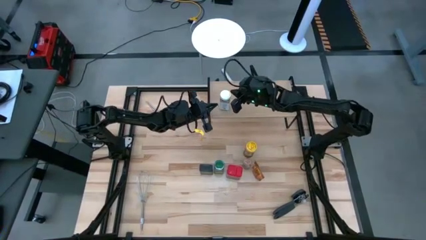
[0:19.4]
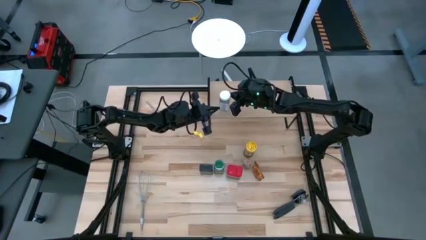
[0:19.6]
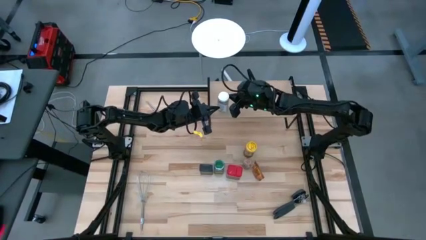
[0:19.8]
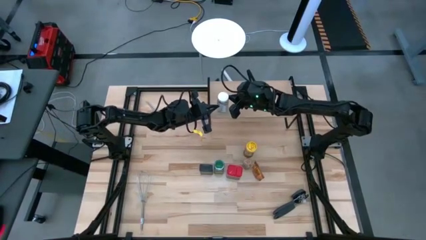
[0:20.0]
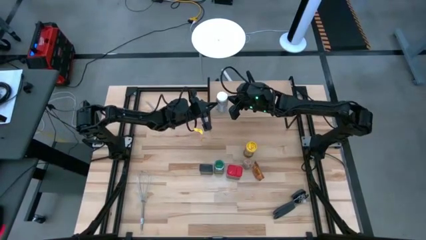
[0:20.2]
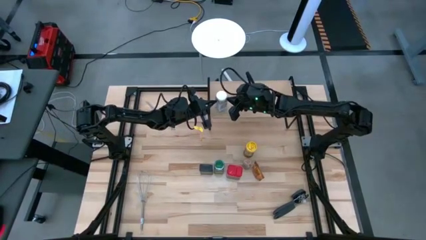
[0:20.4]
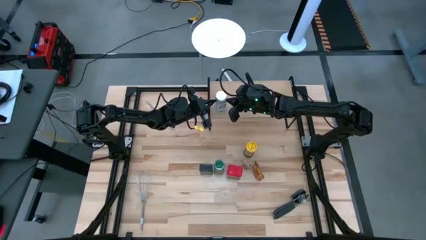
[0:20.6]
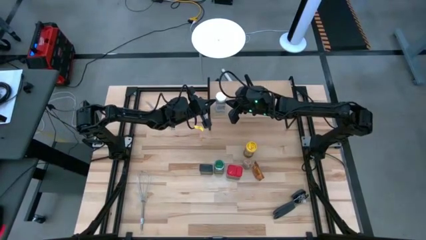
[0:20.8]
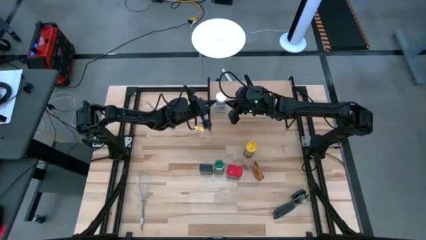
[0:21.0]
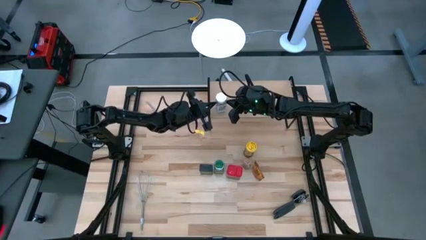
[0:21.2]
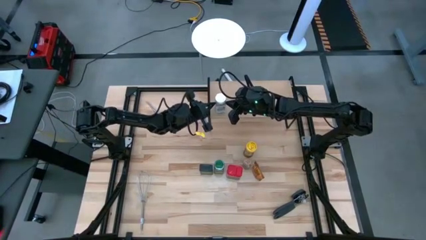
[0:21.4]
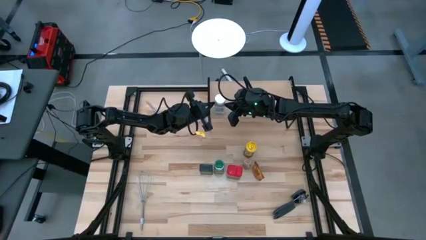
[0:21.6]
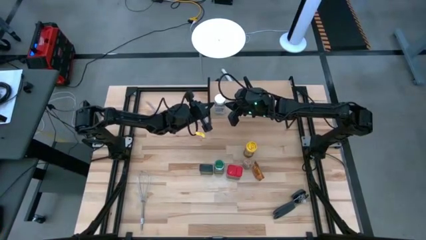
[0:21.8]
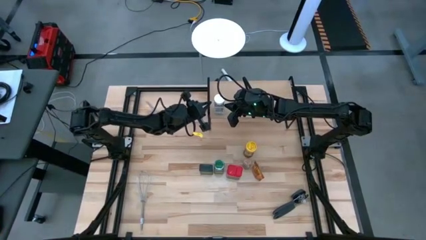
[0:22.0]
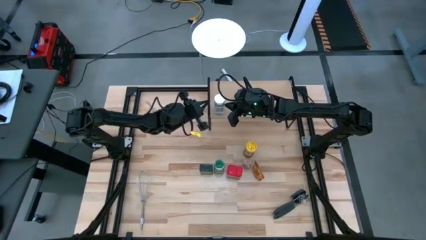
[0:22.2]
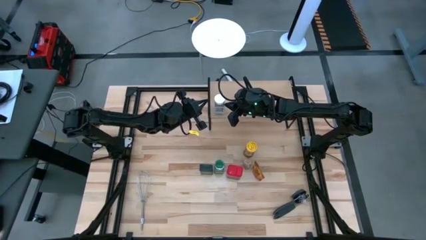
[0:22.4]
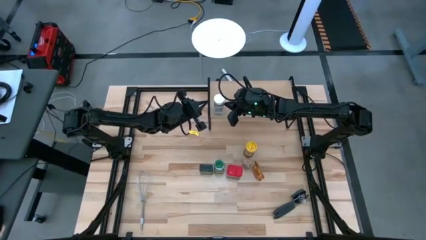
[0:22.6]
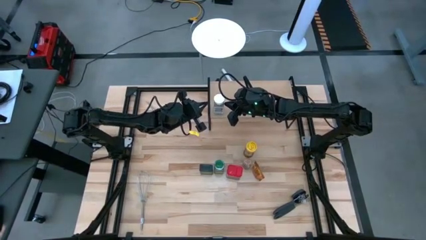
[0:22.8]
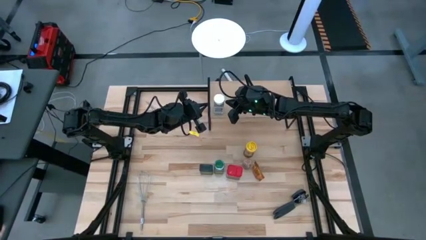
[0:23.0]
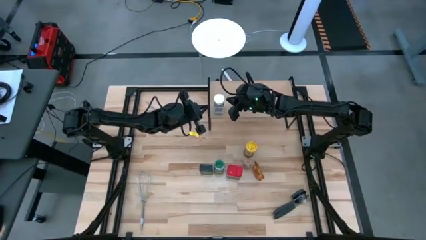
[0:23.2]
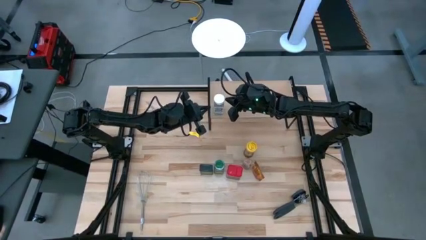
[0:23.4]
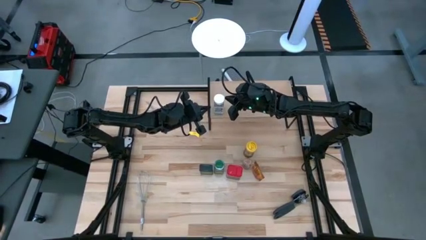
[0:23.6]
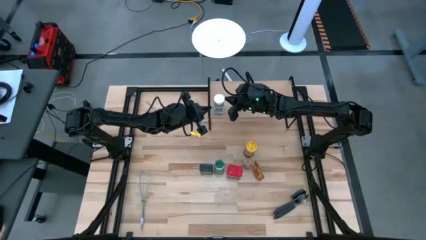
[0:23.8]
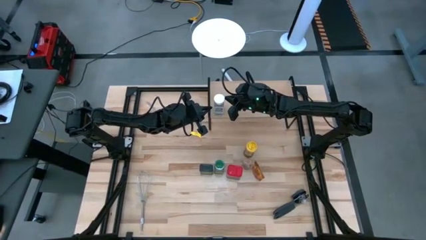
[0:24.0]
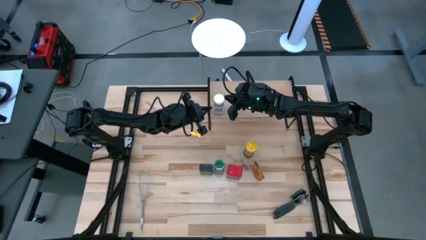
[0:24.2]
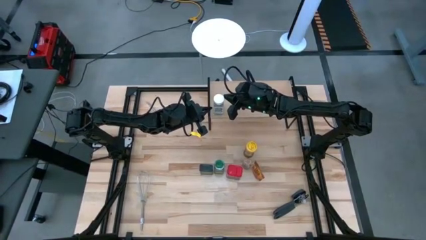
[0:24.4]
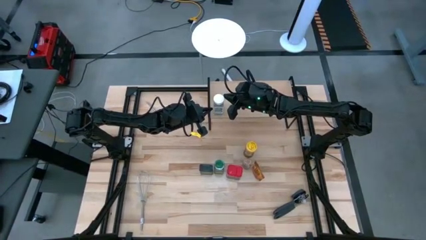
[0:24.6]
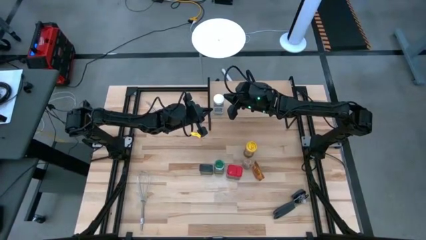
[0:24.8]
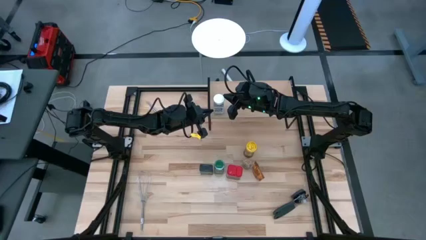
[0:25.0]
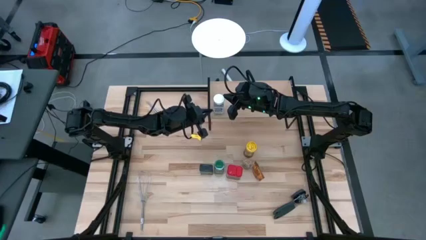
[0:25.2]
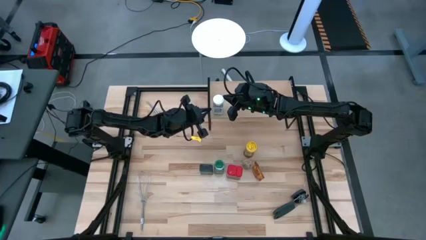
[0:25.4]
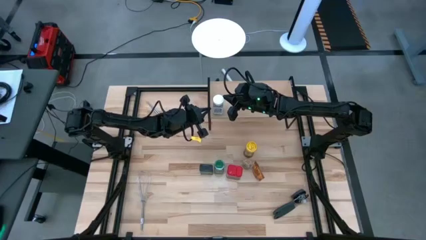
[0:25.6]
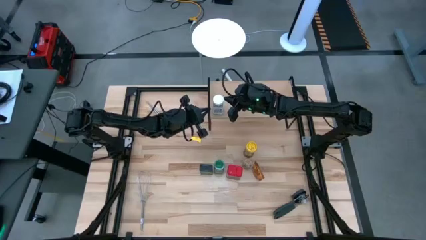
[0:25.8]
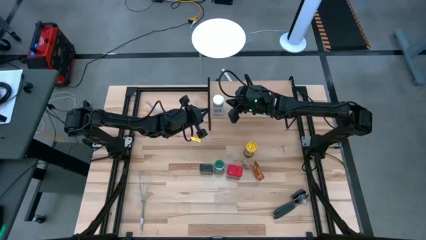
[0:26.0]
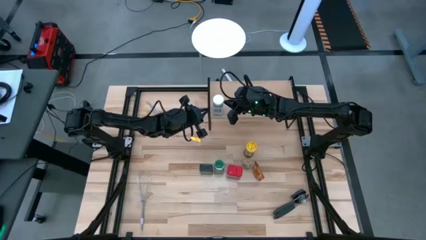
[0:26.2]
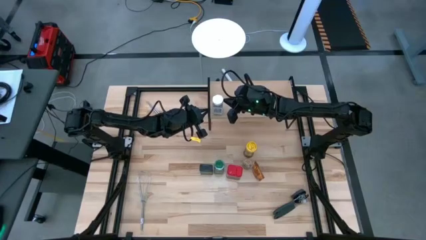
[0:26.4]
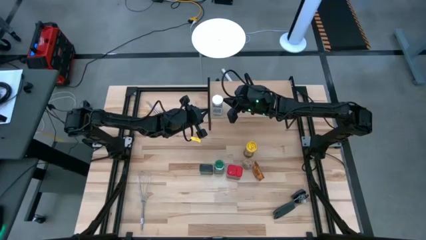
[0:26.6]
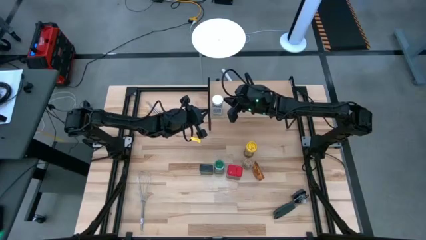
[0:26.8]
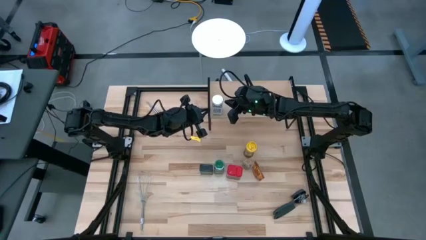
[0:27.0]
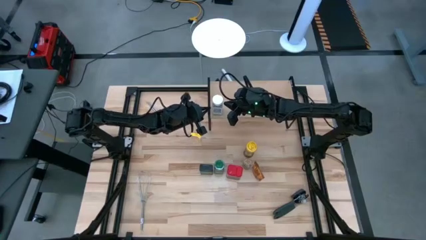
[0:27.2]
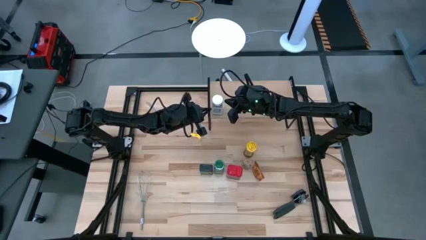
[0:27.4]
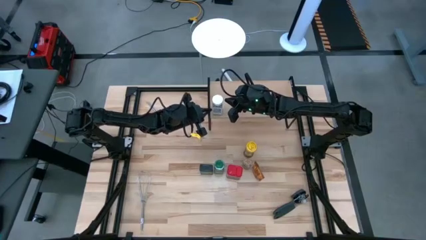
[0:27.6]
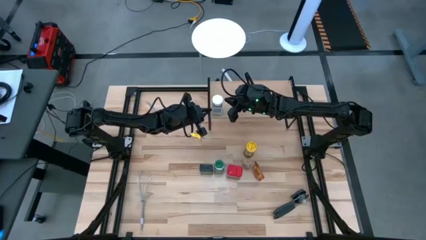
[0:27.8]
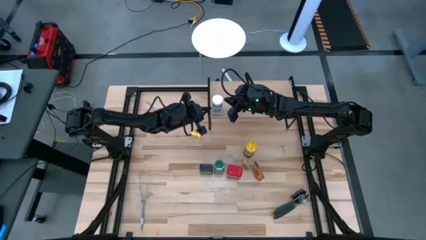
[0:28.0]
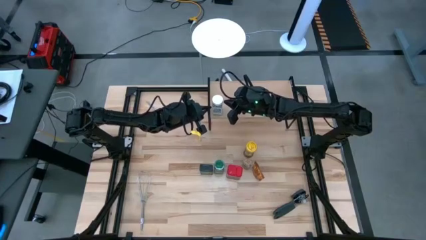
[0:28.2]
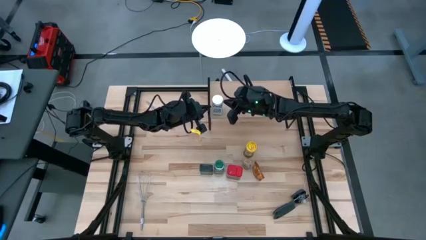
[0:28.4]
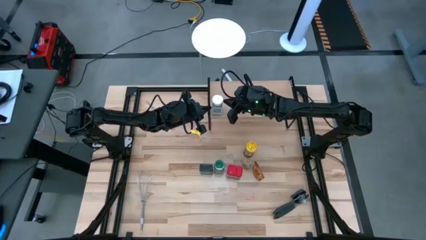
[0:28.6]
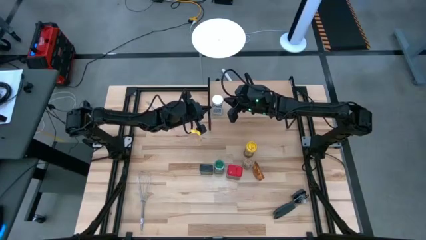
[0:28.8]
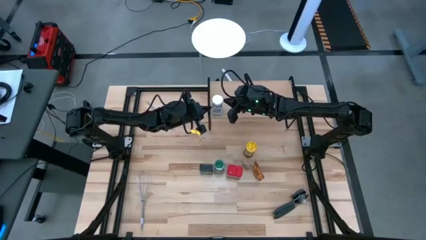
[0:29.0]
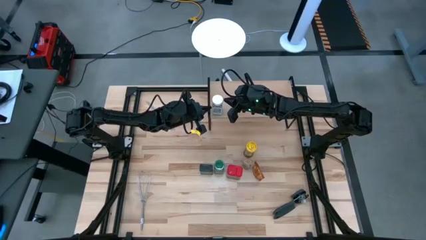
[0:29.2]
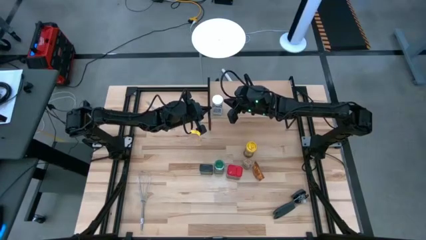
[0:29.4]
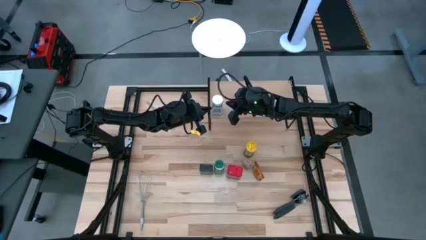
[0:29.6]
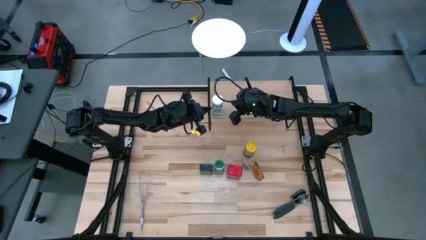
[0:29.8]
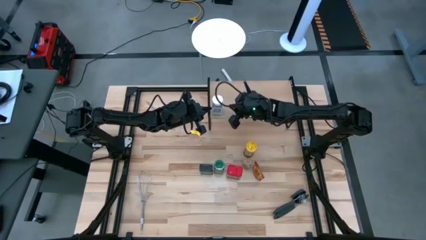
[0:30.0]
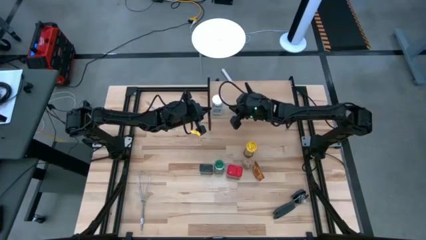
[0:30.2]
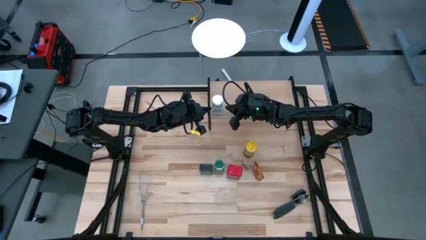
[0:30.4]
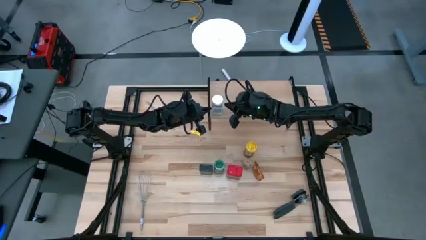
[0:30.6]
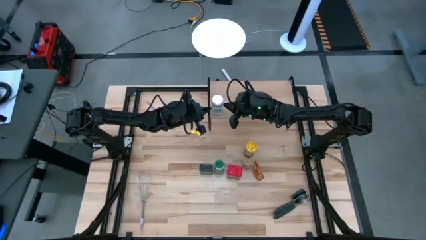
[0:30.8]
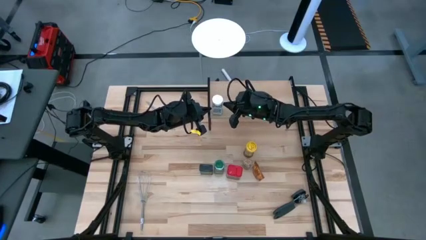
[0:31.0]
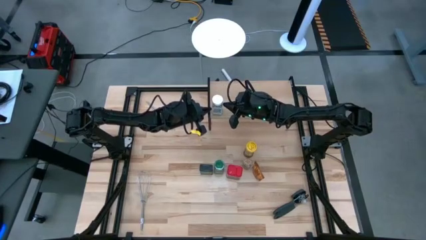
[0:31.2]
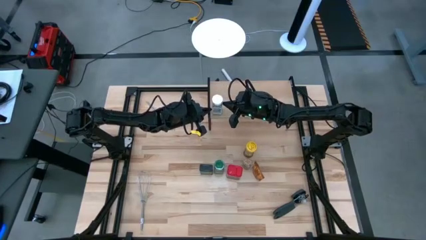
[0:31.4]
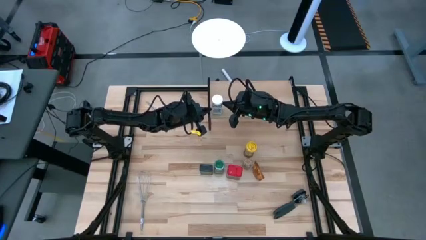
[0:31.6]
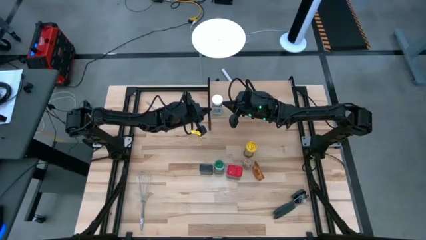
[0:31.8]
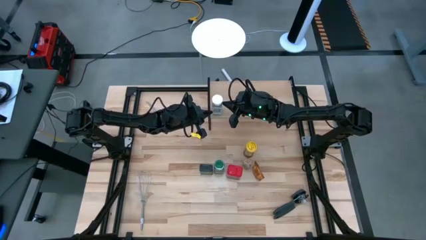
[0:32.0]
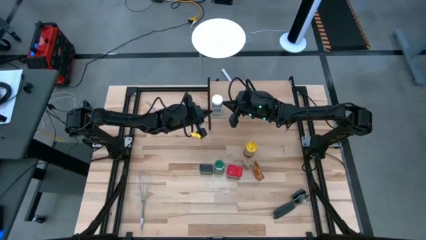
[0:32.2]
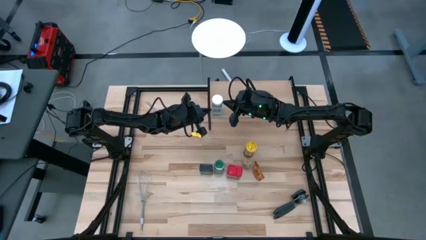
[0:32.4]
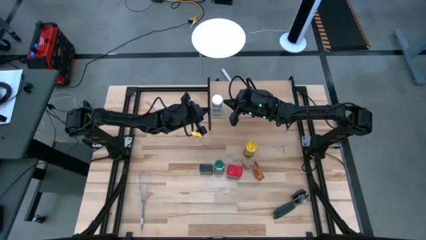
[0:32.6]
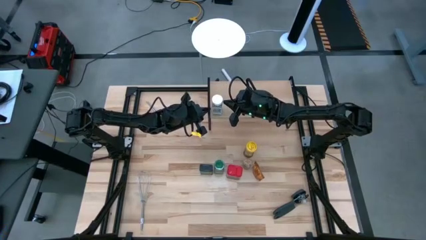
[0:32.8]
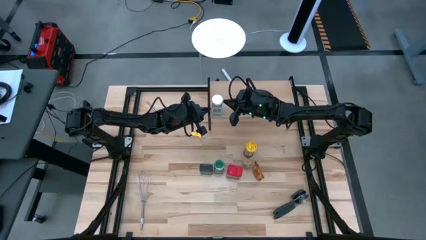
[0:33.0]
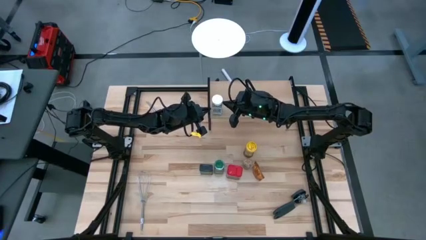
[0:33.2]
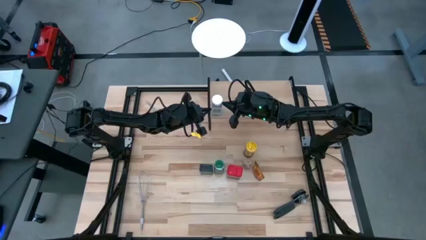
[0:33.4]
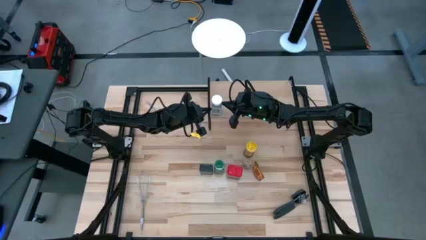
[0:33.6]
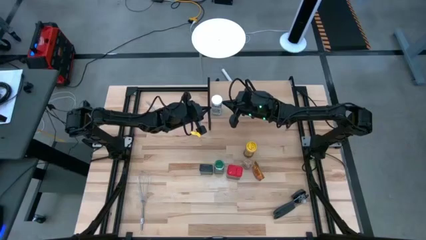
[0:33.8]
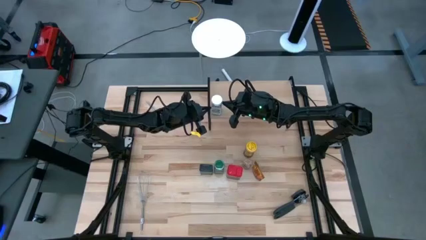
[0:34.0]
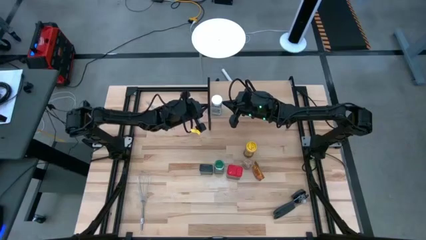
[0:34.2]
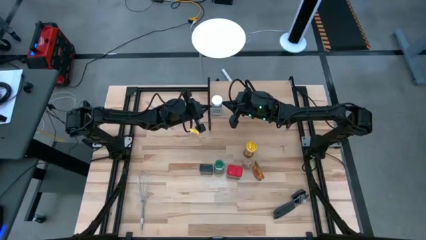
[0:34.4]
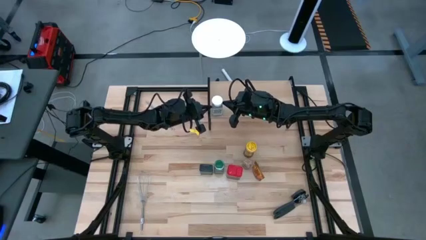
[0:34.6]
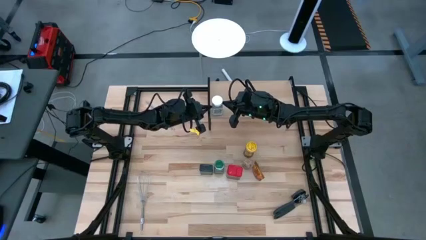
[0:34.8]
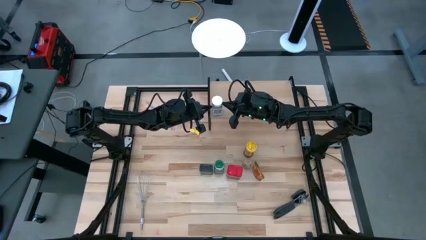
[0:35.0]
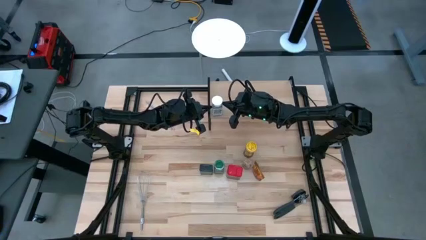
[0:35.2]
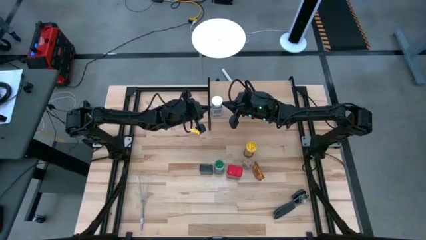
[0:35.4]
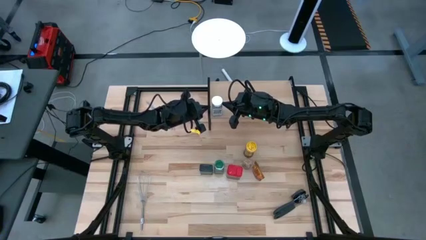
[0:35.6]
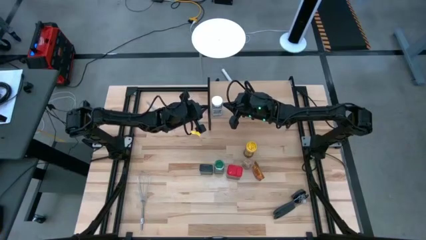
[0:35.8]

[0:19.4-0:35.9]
Task: Shelf spices
Put the white seasoning bottle on the shelf
